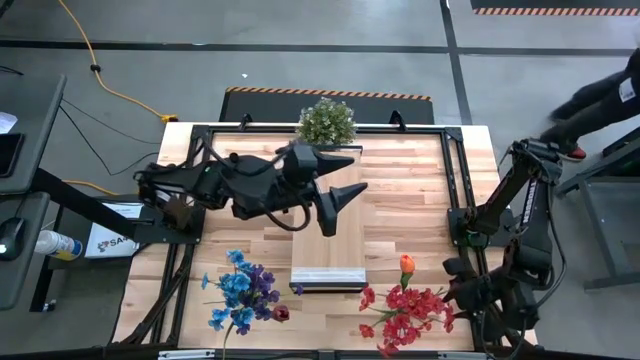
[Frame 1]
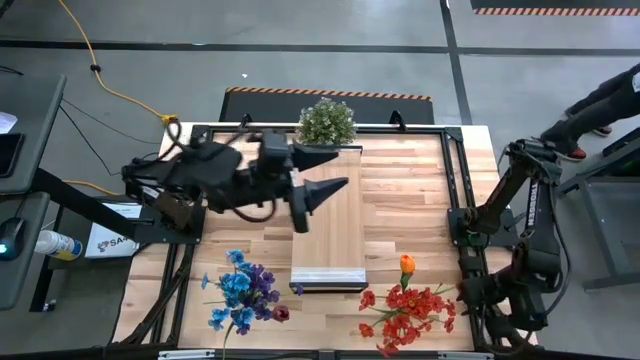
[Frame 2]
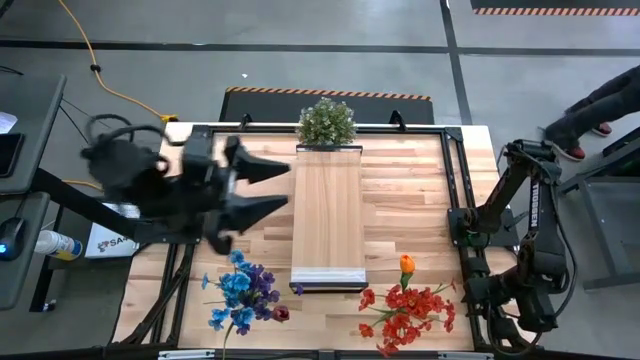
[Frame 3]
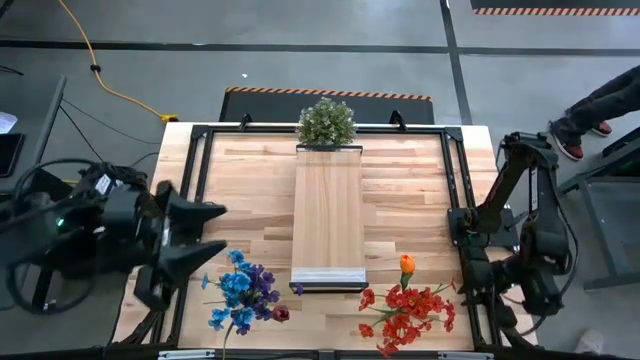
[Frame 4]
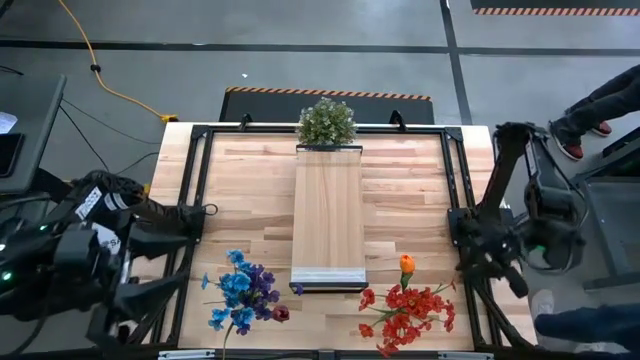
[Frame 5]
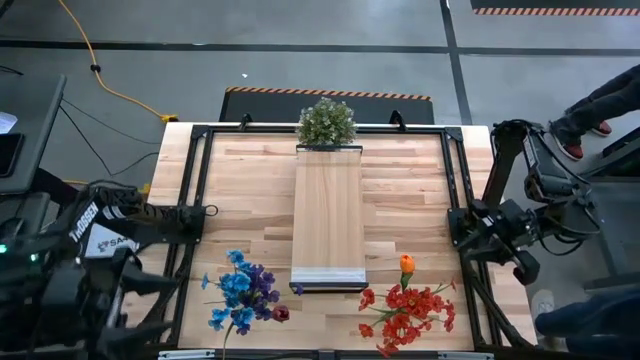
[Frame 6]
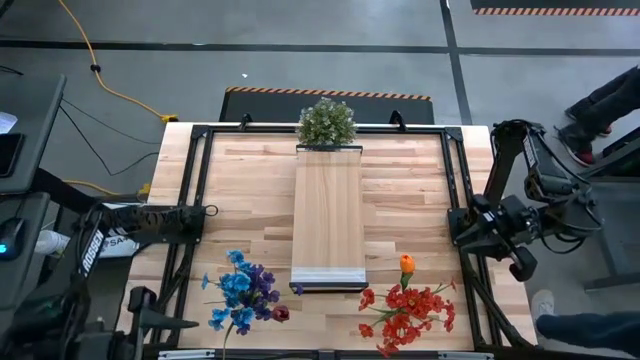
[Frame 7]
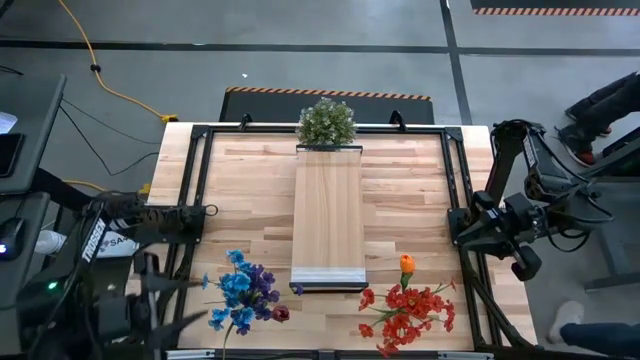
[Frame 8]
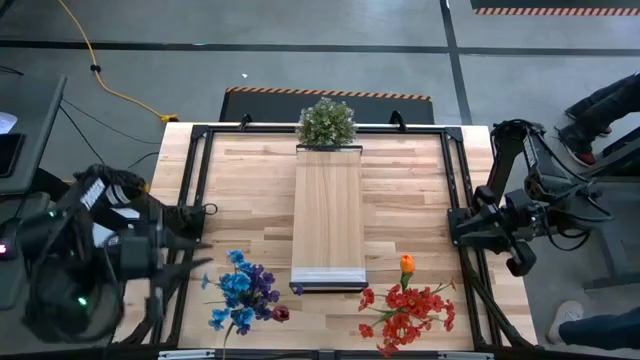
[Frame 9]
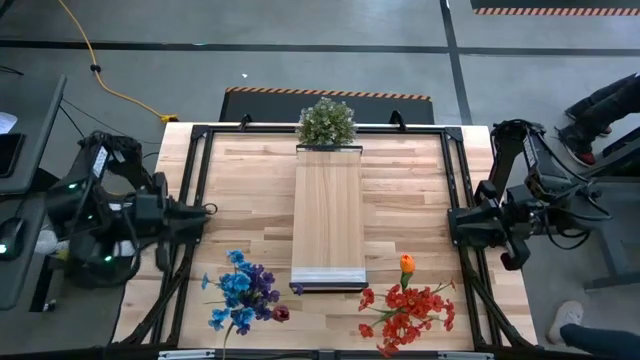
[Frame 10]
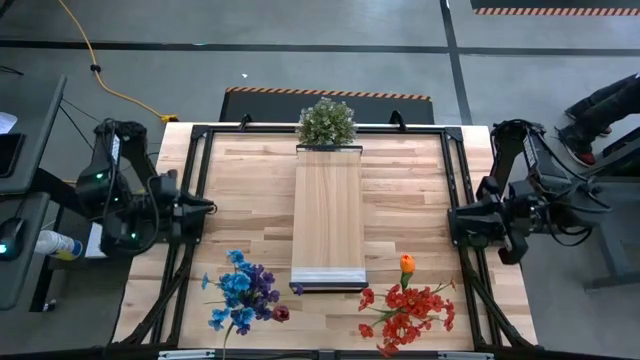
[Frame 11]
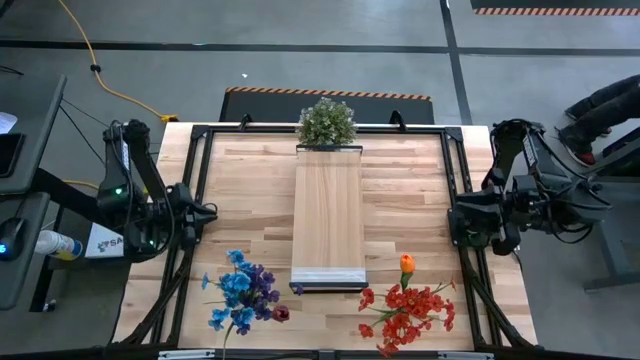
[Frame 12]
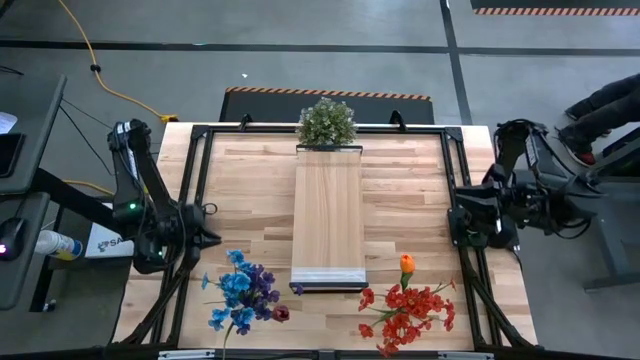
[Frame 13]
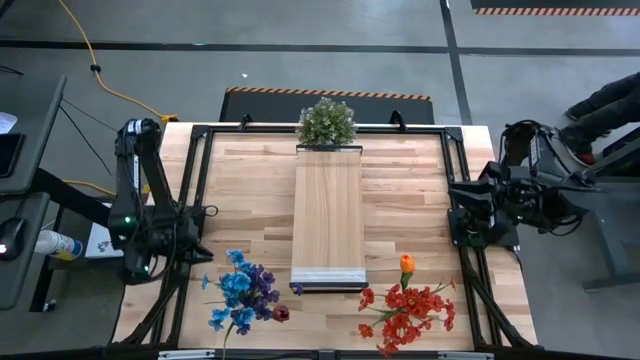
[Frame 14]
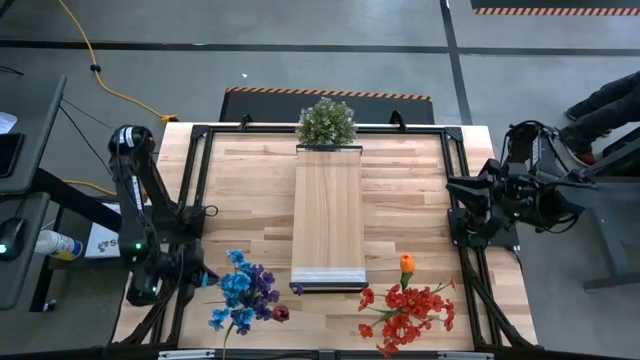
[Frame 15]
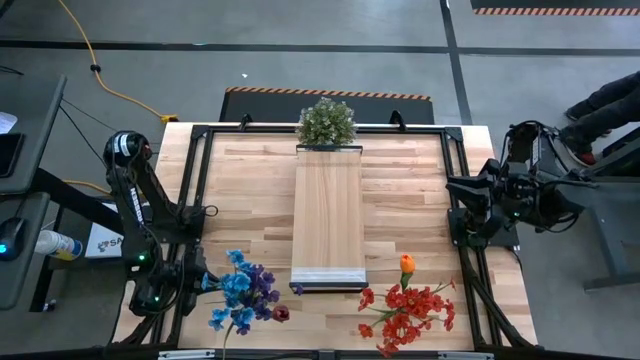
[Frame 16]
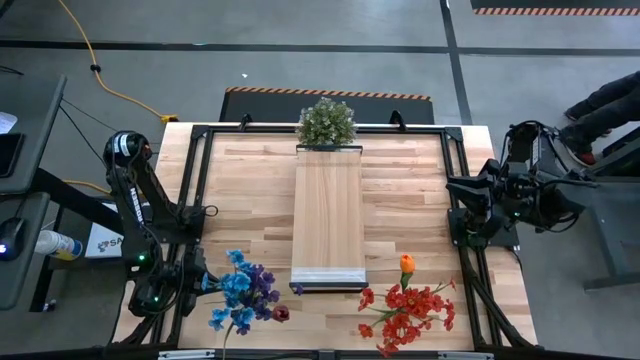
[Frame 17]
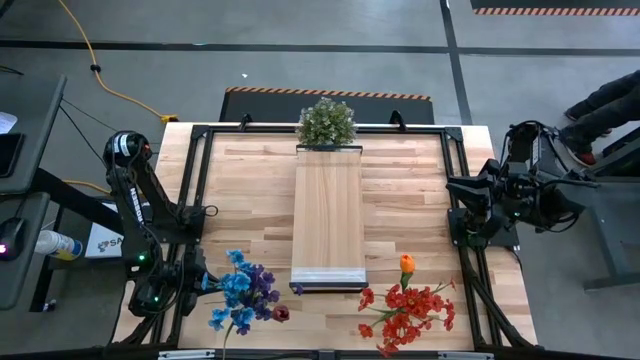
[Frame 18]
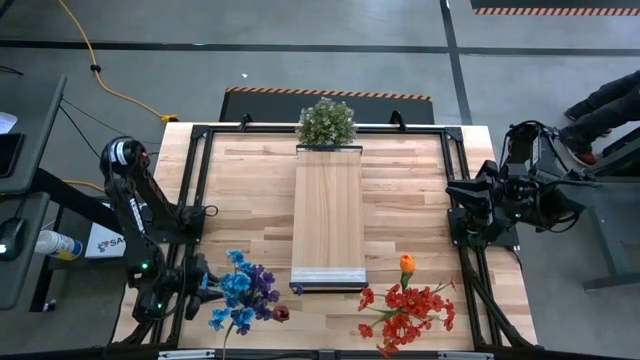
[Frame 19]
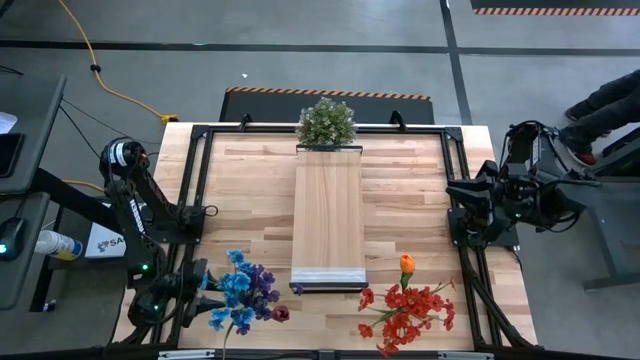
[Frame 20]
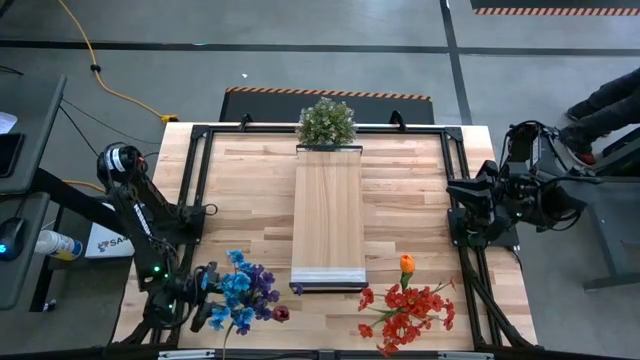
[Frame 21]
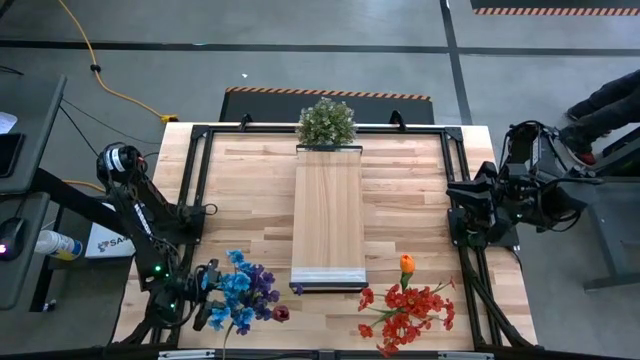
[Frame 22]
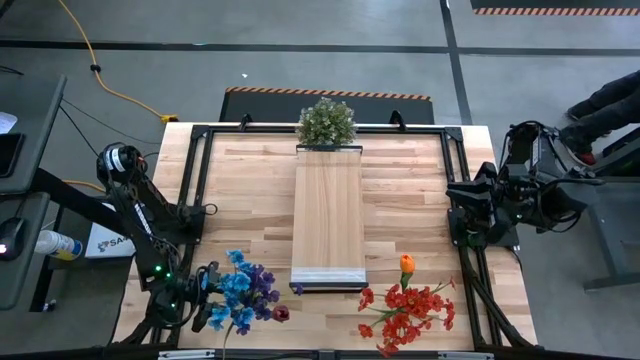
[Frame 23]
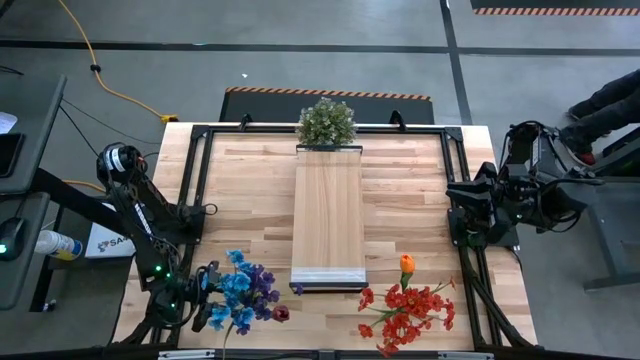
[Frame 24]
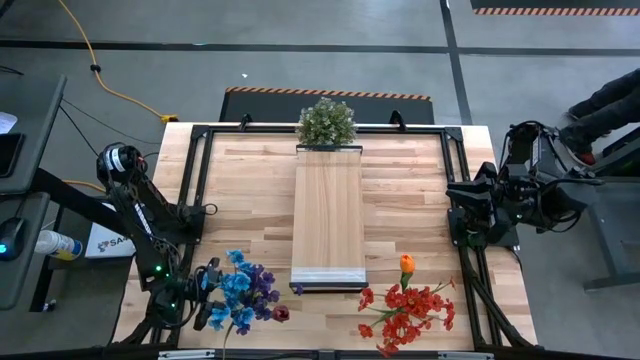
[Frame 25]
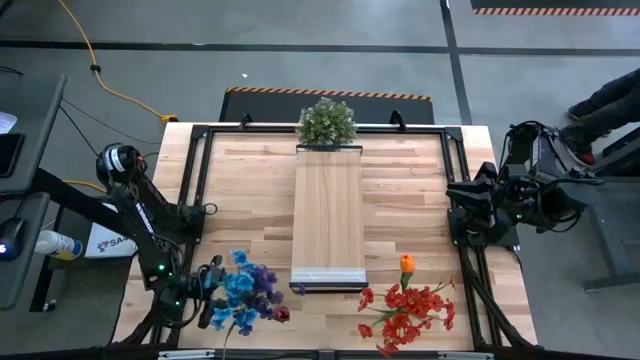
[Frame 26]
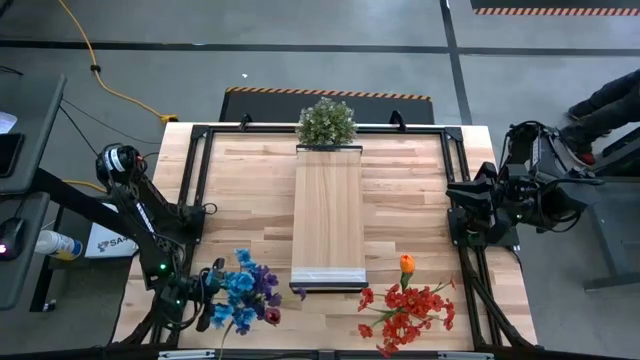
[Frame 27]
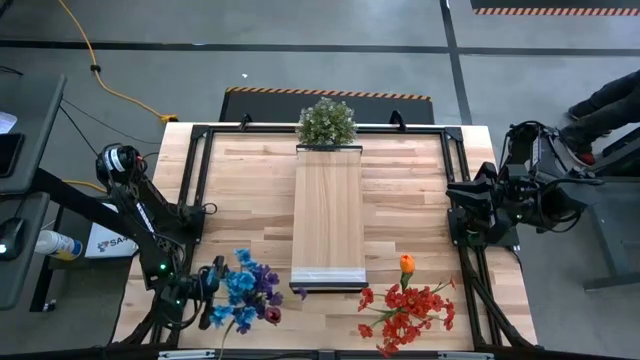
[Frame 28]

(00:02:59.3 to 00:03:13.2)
Task: Pick and place flowers into a vace then onto a shelf
Put the left transparent vase on the shelf

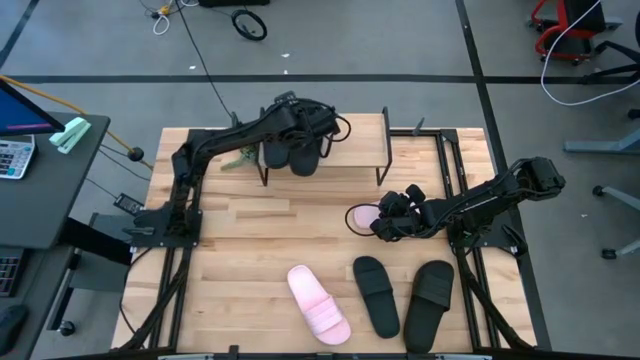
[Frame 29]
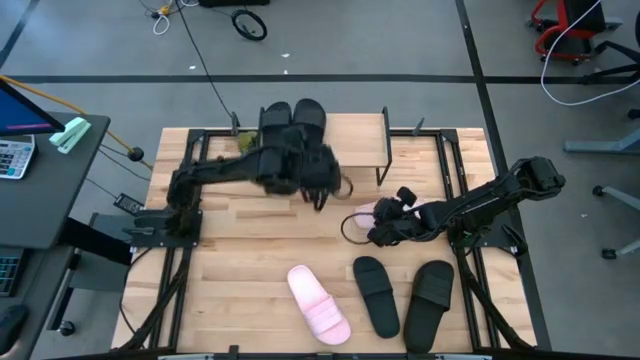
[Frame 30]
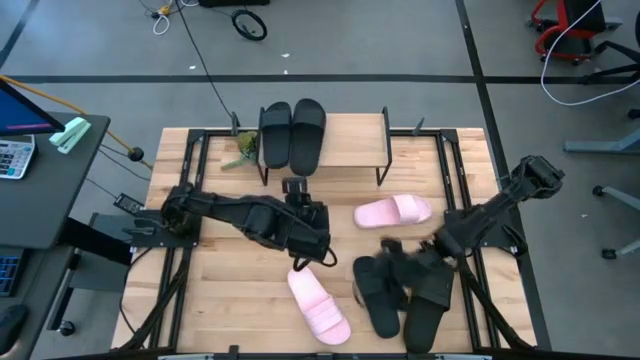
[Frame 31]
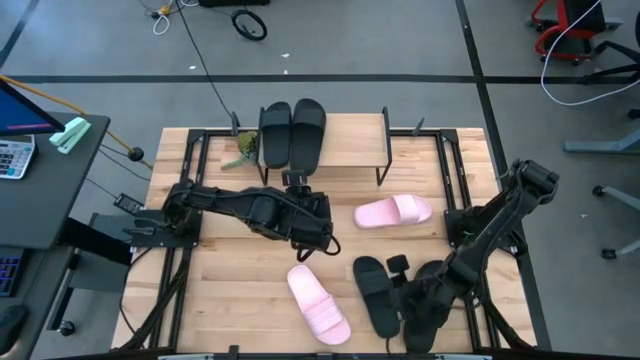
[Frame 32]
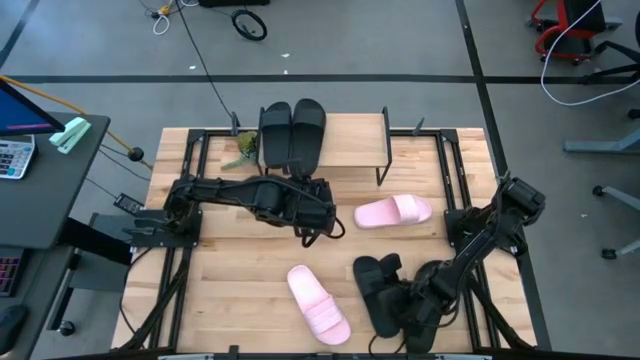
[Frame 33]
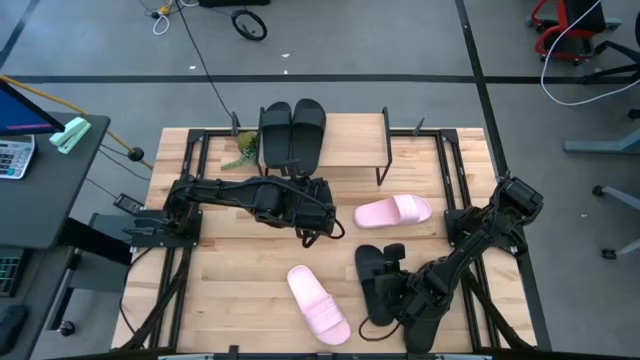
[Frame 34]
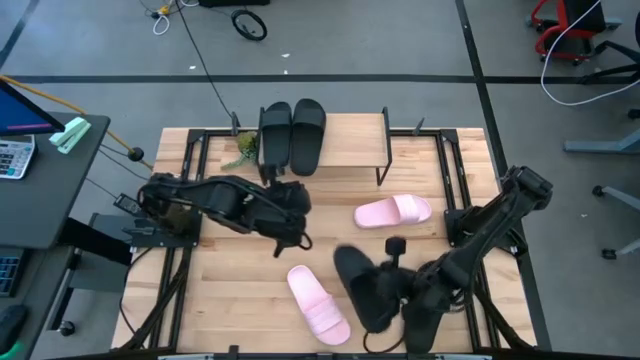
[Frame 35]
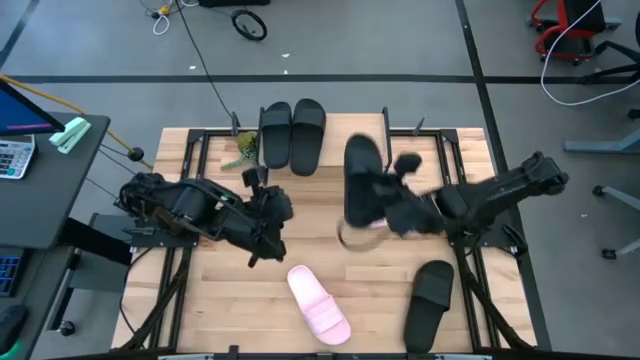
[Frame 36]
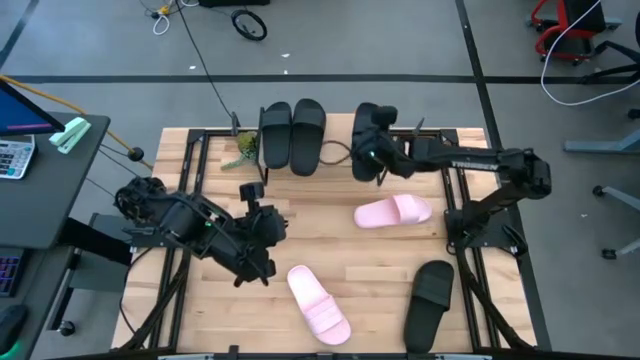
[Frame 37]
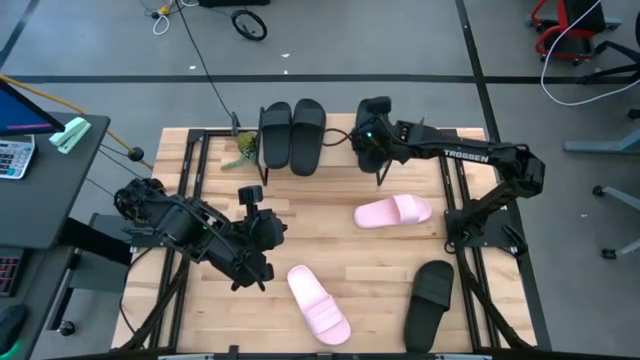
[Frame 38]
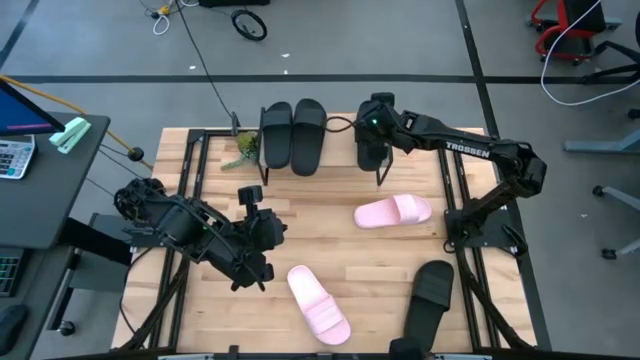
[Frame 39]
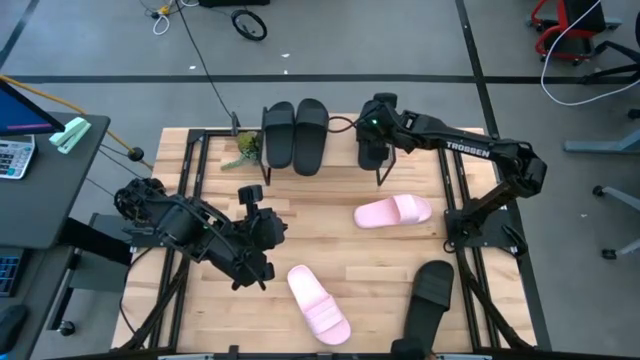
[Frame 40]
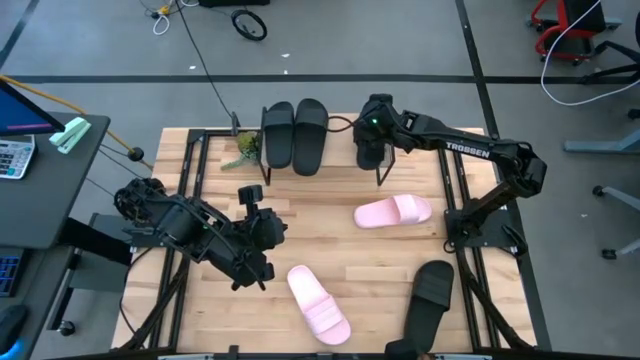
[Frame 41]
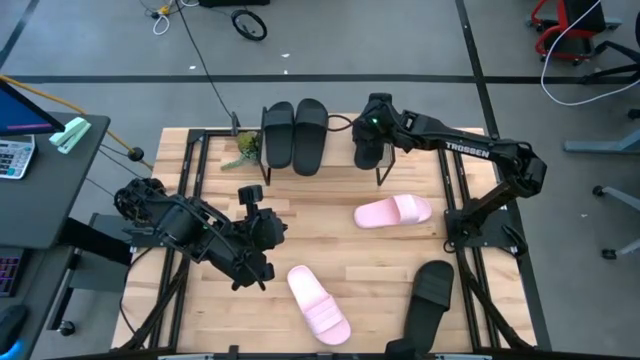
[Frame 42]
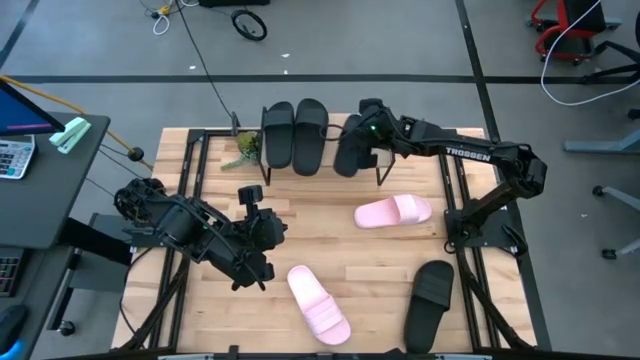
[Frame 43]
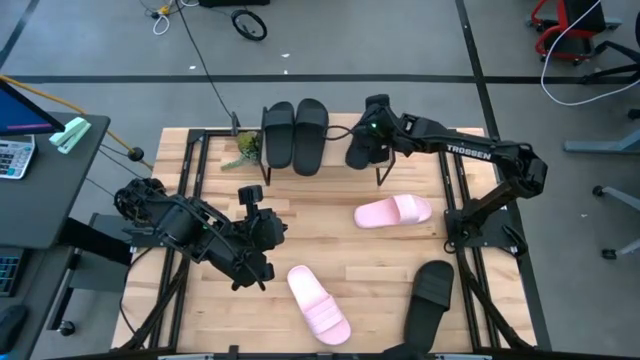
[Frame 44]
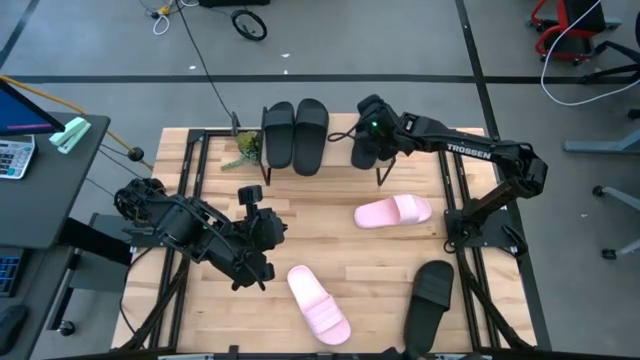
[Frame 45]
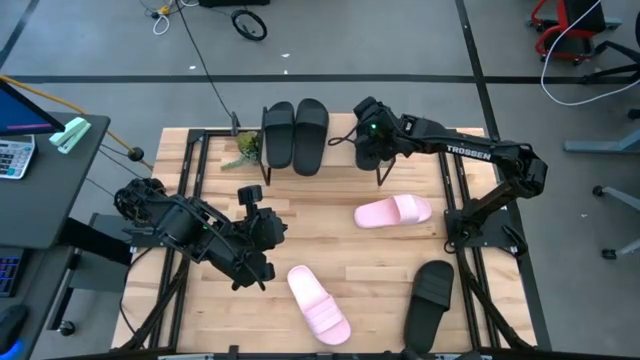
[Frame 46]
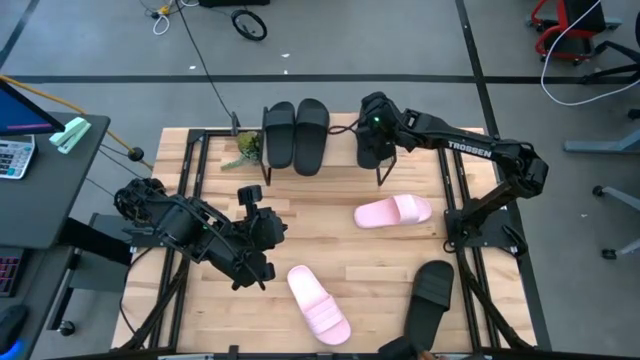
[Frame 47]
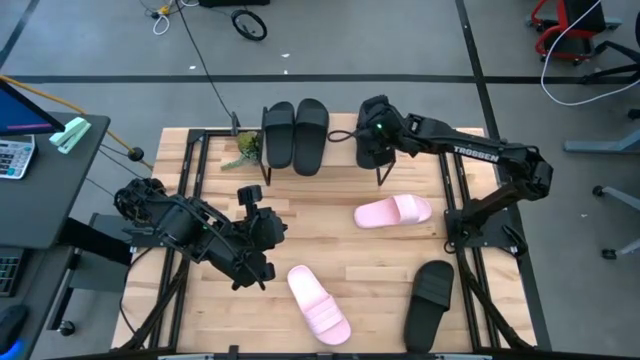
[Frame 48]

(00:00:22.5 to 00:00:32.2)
Task: Pick and place slides into the shelf
Put the black slide on the shelf
